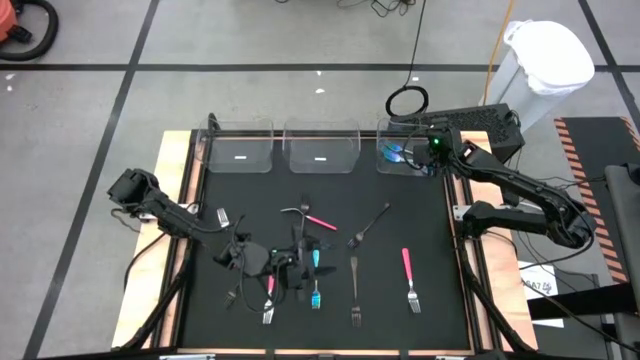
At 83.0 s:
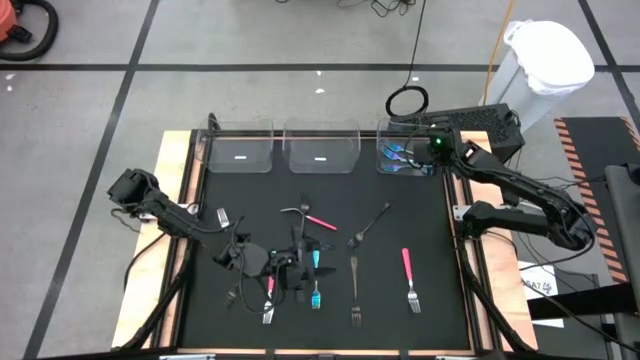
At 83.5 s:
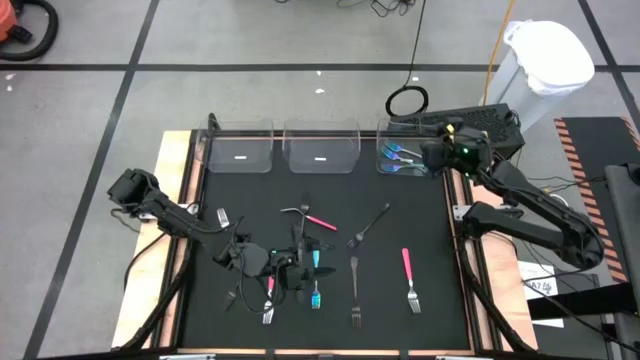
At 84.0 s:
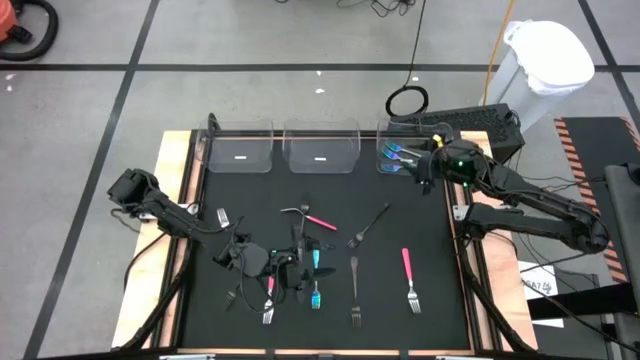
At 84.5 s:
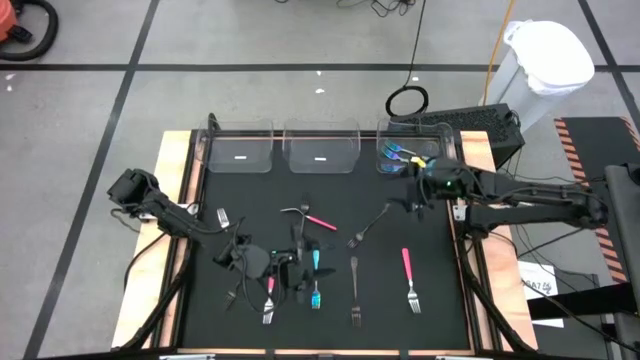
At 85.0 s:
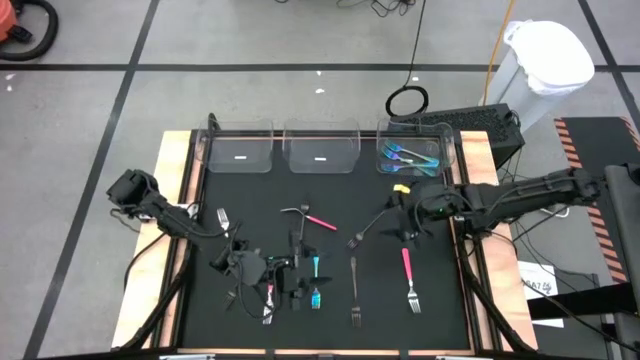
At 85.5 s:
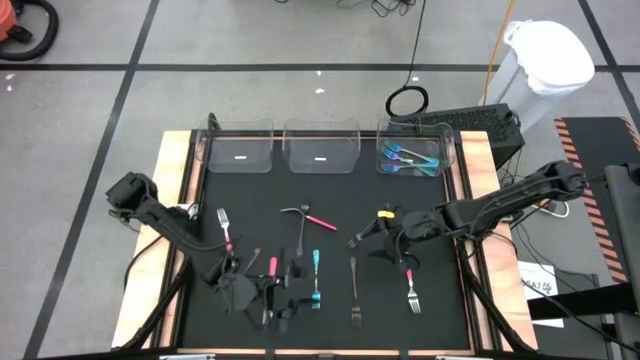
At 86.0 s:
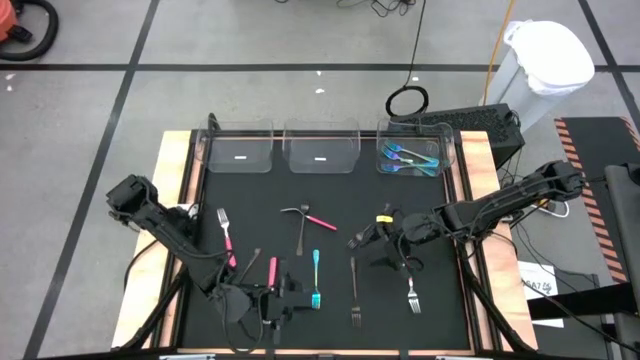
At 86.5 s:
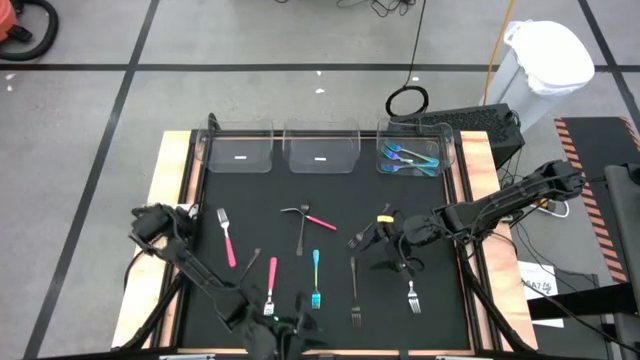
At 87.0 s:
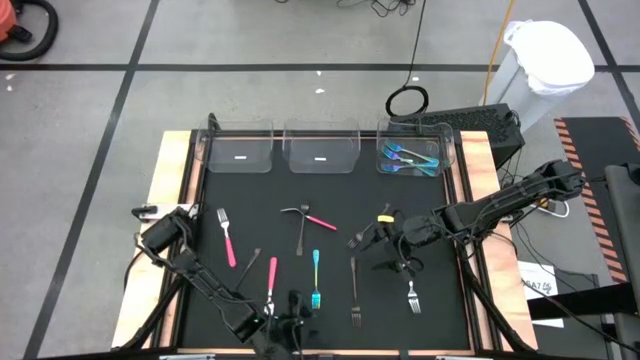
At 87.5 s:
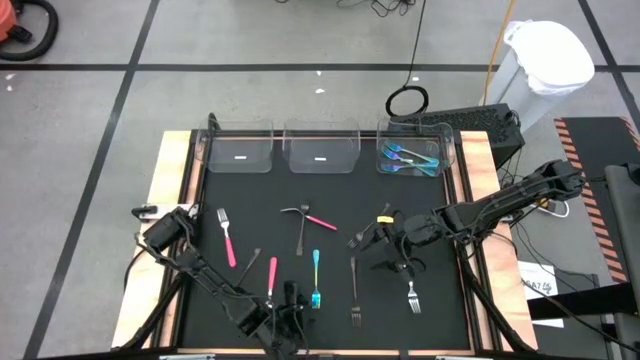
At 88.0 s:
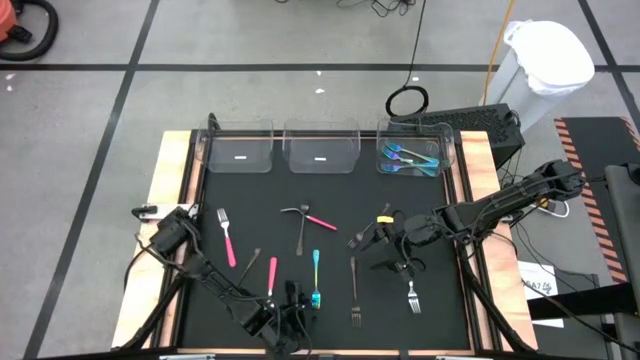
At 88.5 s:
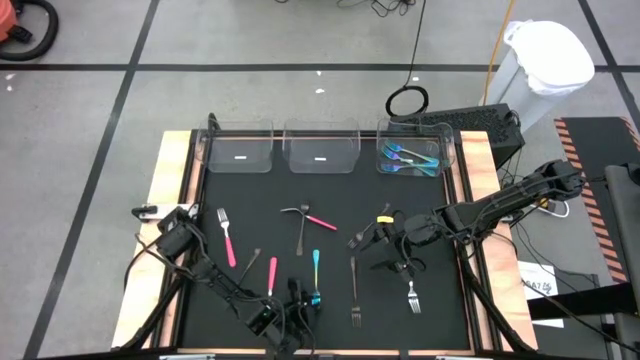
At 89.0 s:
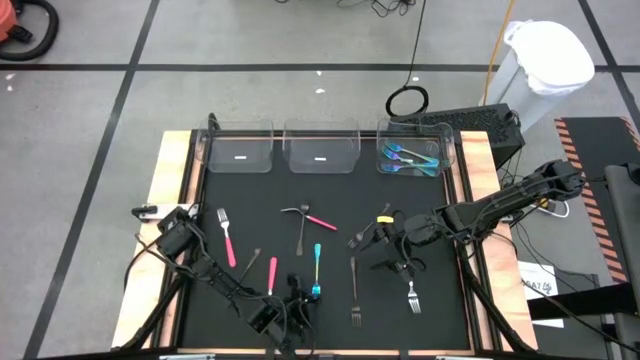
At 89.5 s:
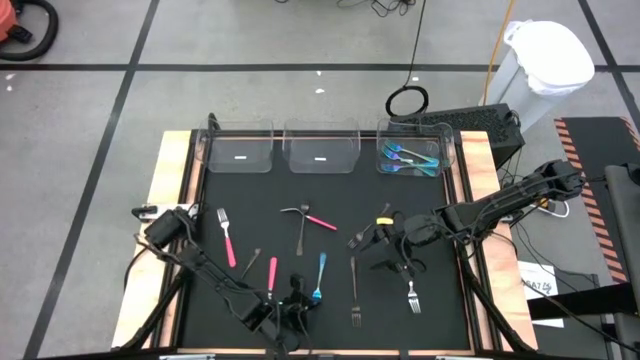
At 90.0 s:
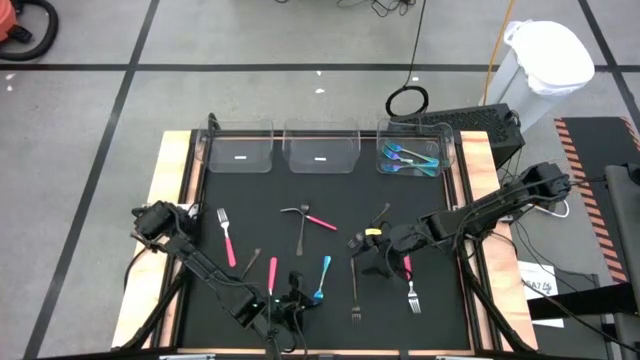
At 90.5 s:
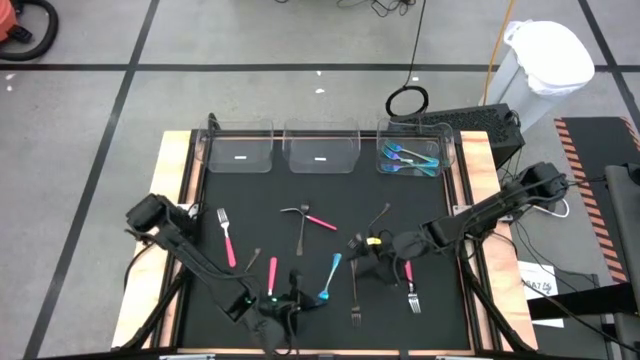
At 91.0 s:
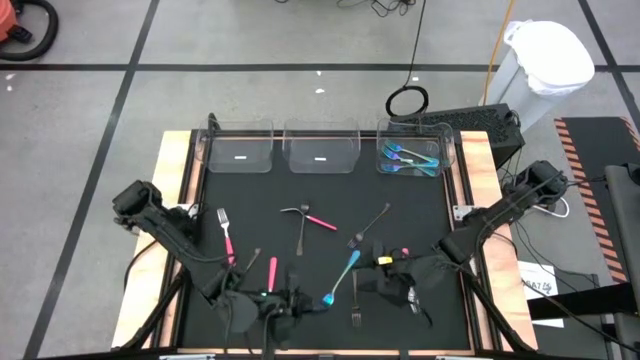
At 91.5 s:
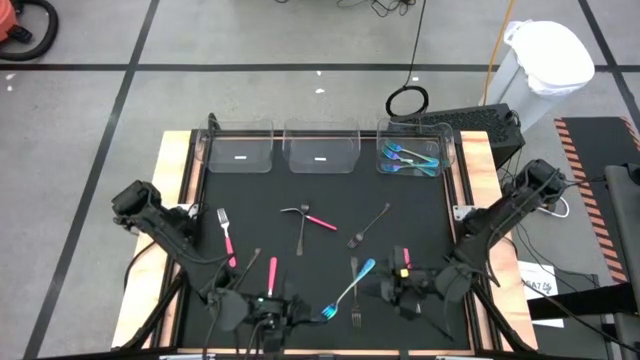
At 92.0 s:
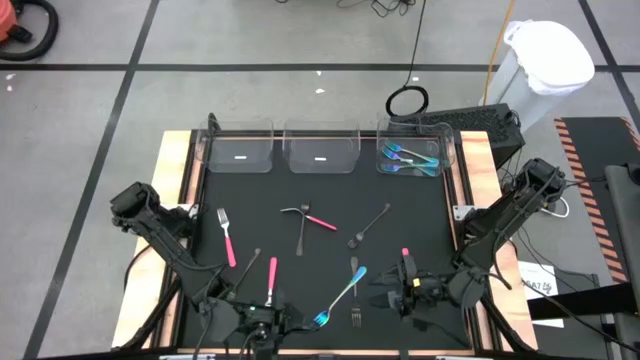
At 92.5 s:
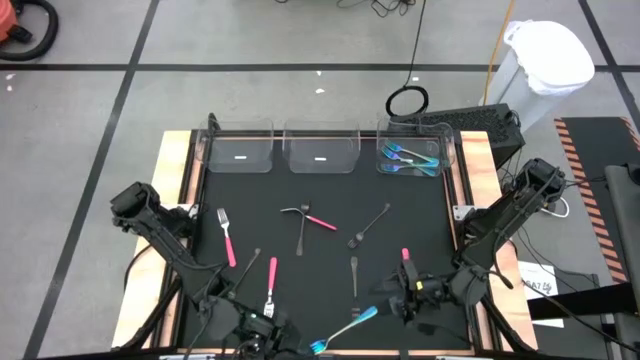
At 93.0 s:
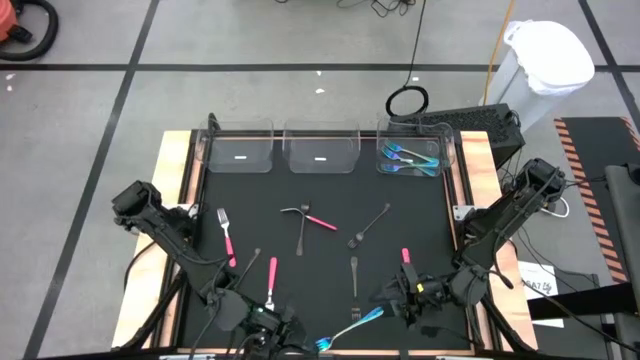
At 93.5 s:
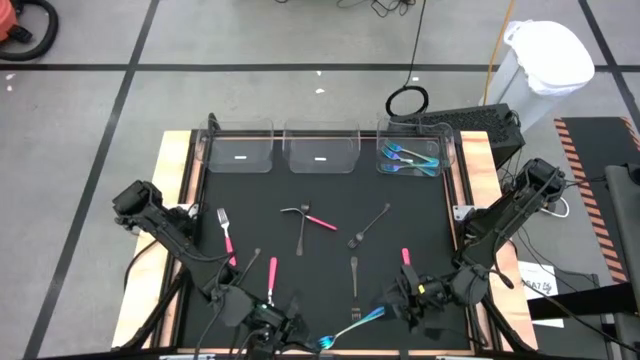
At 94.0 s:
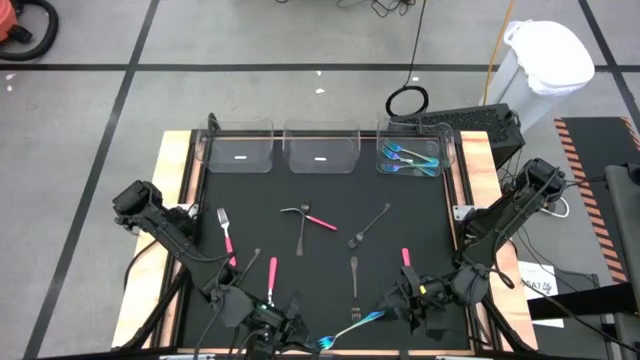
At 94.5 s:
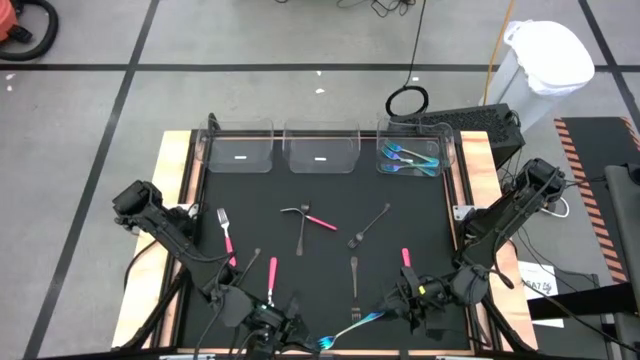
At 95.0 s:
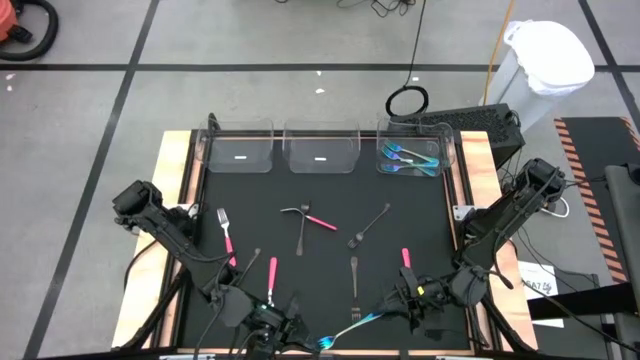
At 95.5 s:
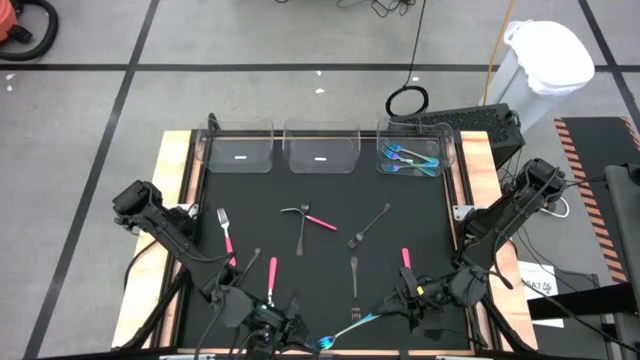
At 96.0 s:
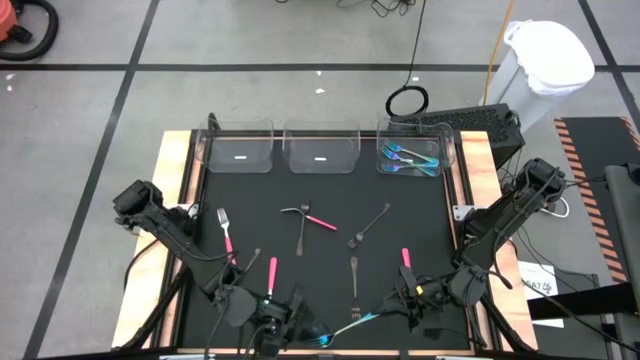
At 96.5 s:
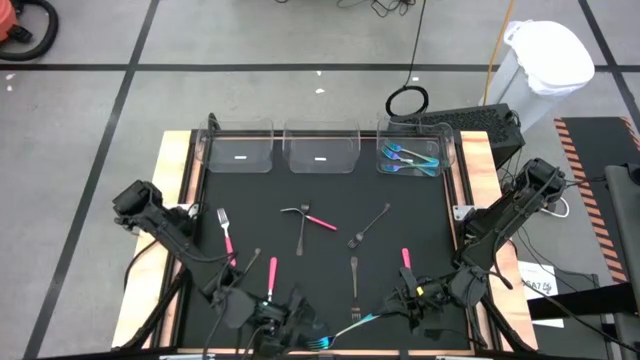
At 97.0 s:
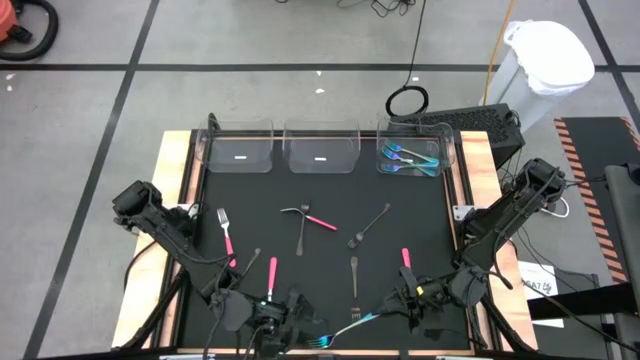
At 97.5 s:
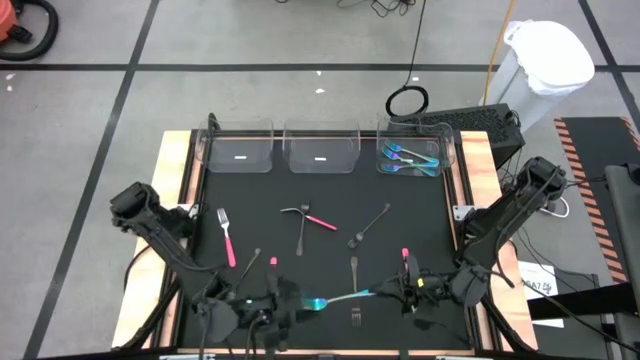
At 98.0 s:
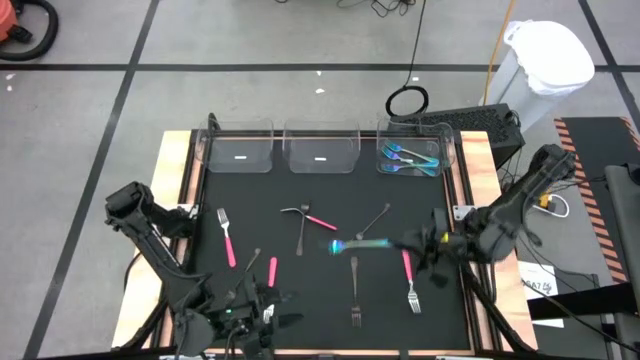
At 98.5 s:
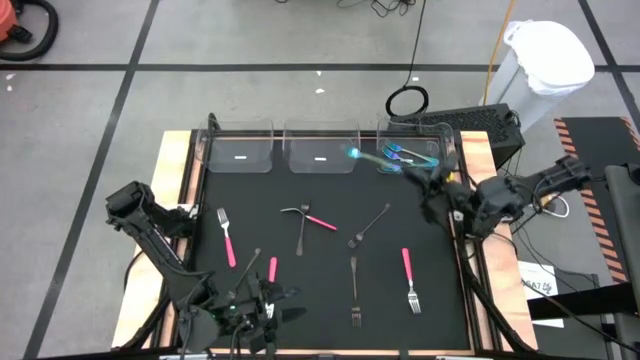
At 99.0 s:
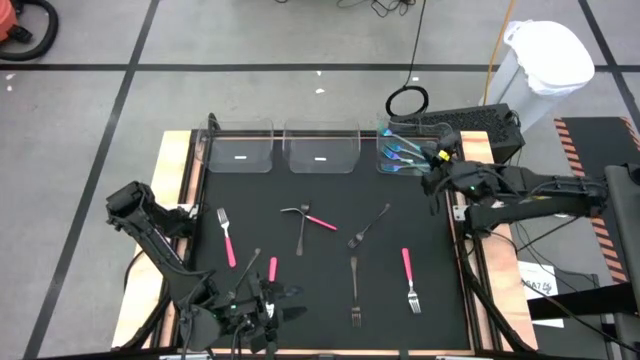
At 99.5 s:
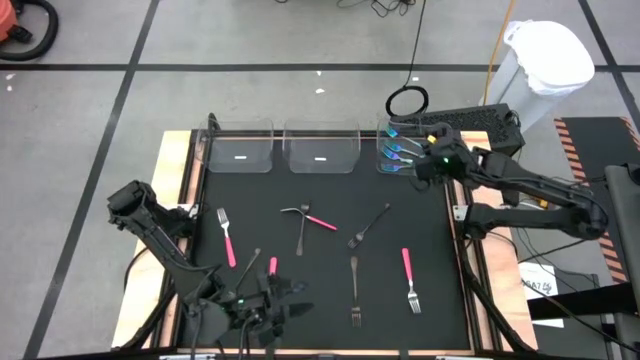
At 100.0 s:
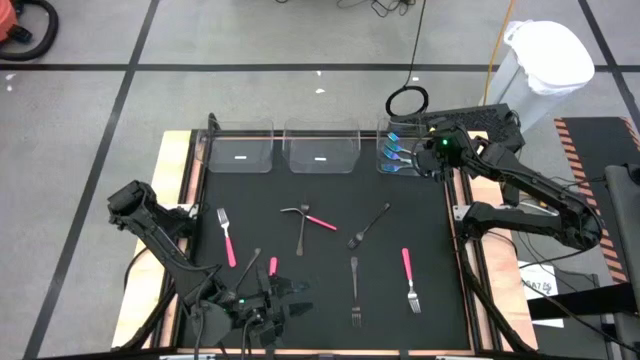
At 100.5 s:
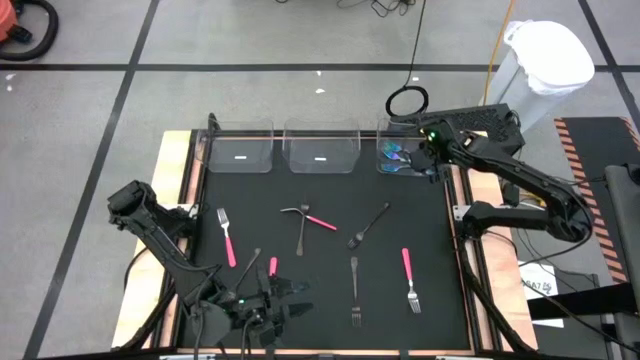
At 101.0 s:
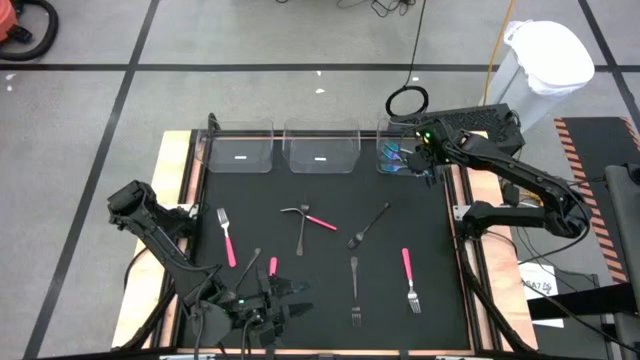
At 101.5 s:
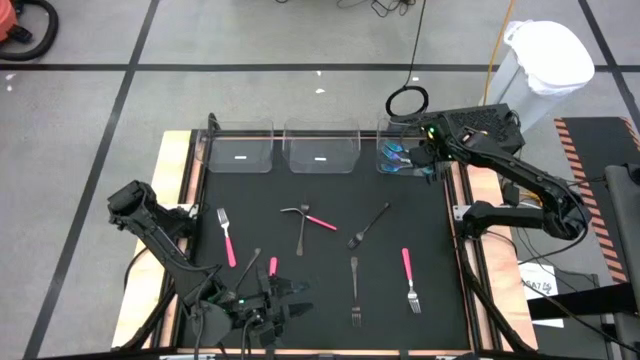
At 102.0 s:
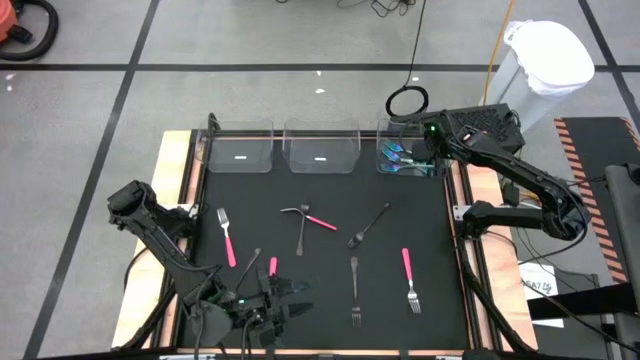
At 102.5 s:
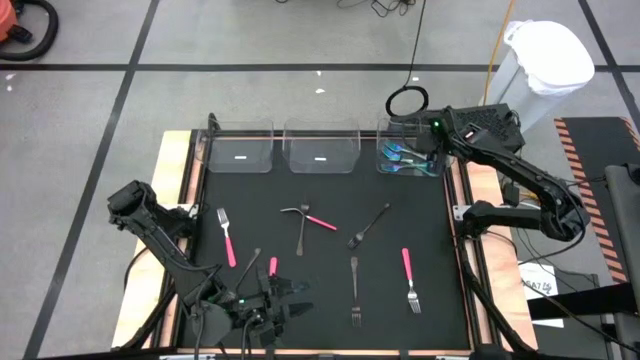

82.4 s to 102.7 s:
Task: Sort silverware by color (type)
Put the blue fork into the right transparent bin

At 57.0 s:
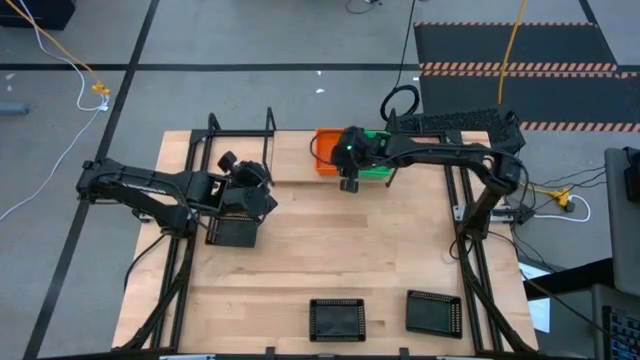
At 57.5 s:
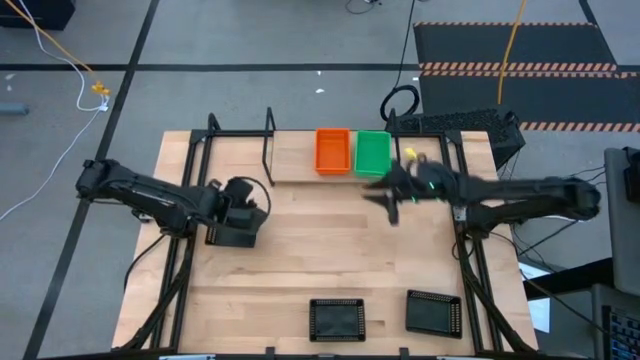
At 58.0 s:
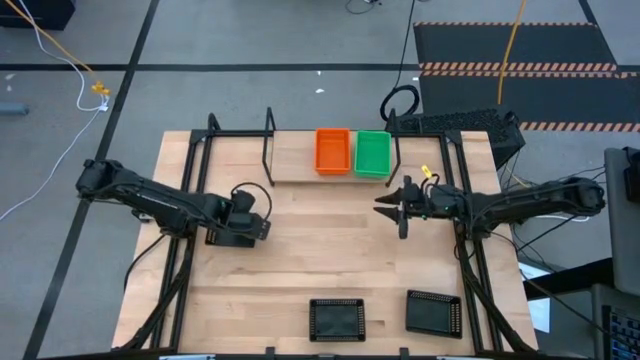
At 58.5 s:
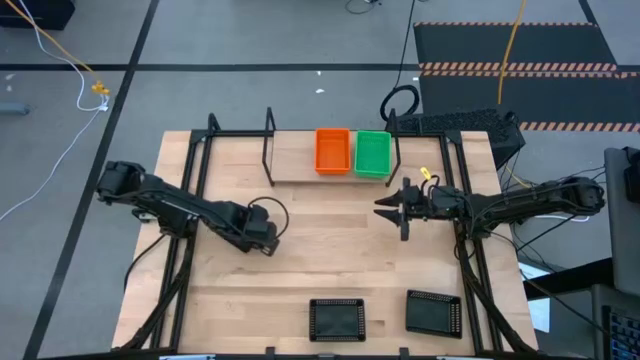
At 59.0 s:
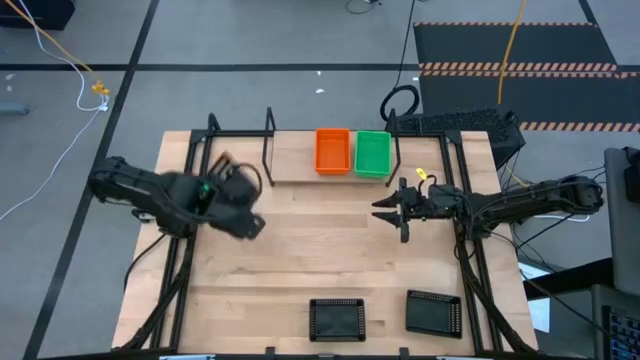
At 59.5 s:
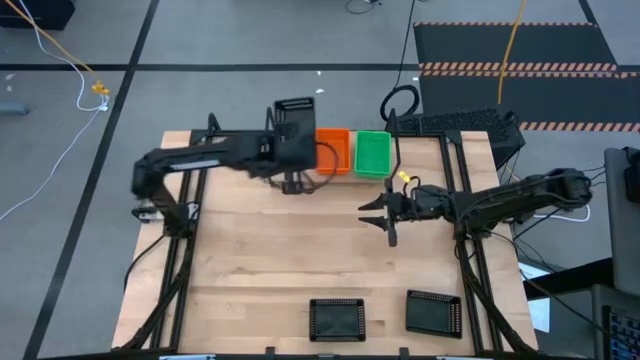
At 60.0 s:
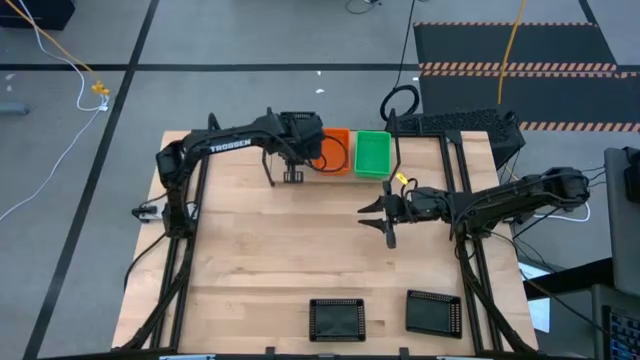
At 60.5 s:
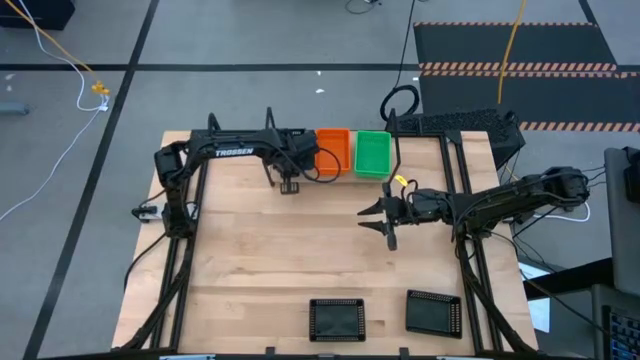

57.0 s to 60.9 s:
Task: Stack baskets on shelf by color
Put the top black bin on the shelf
